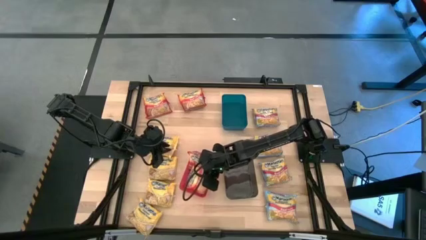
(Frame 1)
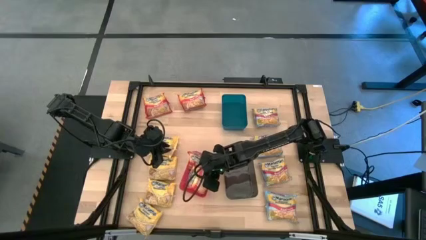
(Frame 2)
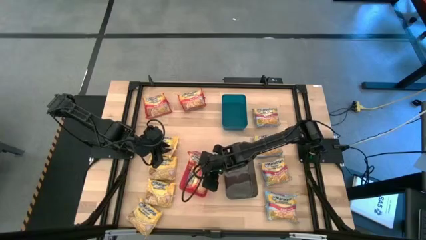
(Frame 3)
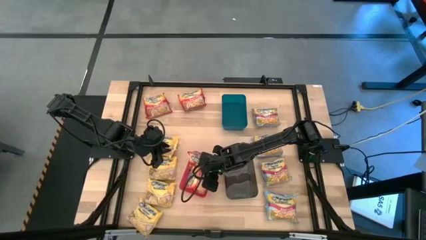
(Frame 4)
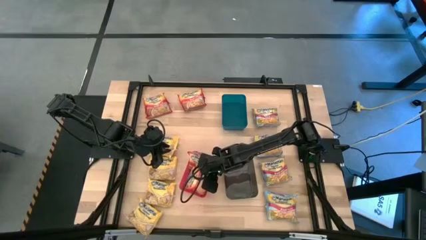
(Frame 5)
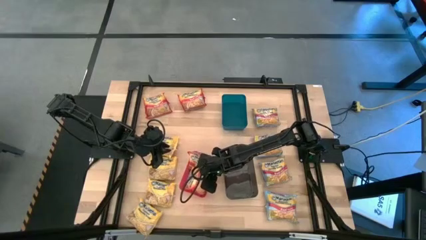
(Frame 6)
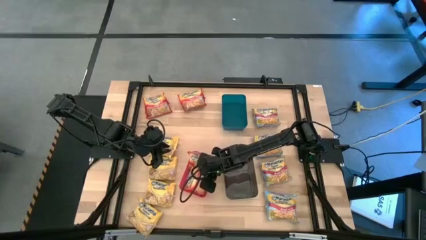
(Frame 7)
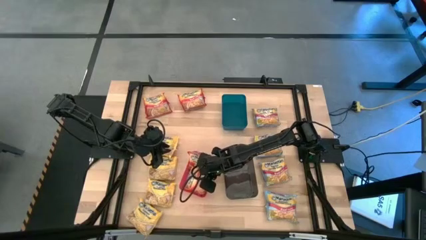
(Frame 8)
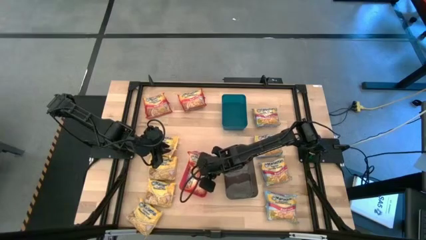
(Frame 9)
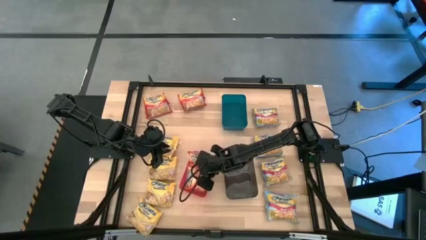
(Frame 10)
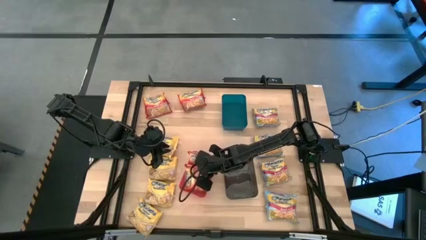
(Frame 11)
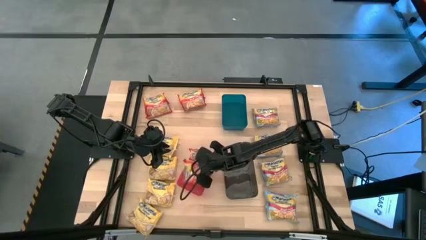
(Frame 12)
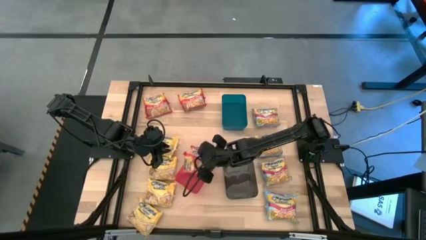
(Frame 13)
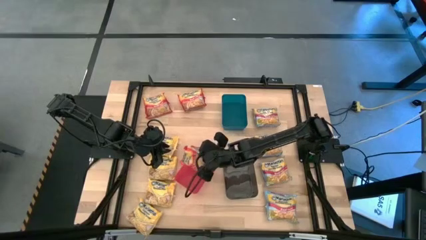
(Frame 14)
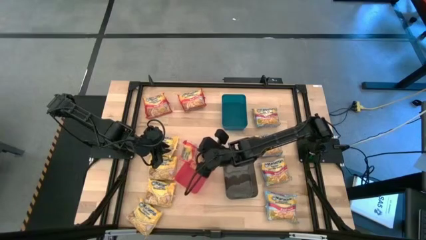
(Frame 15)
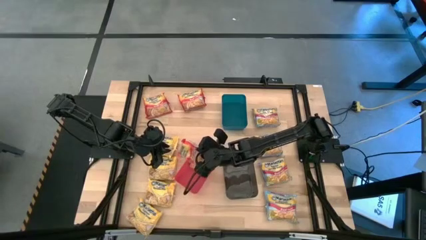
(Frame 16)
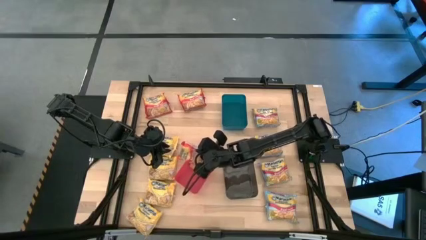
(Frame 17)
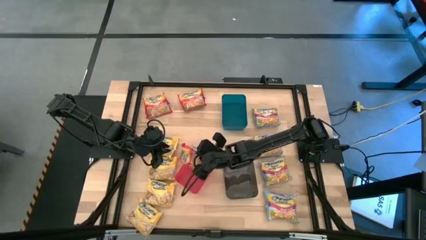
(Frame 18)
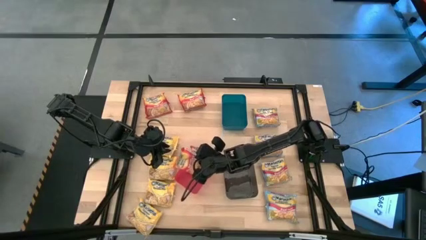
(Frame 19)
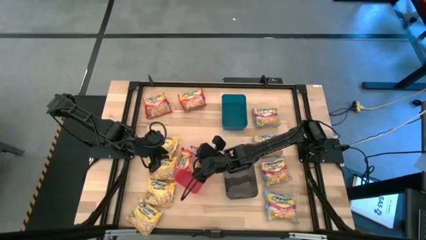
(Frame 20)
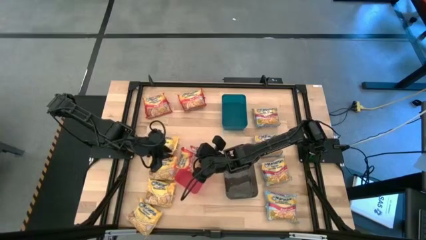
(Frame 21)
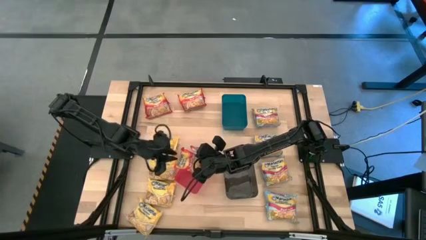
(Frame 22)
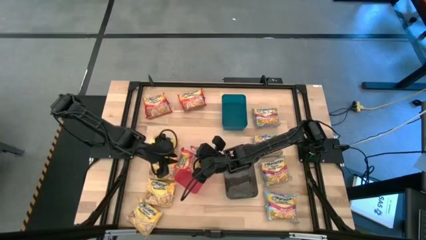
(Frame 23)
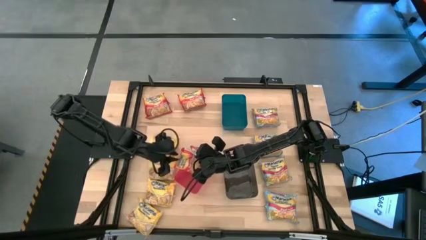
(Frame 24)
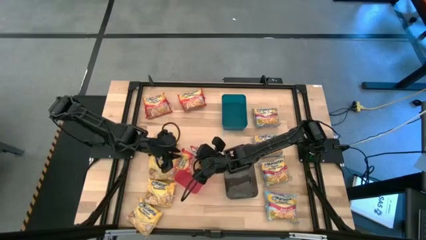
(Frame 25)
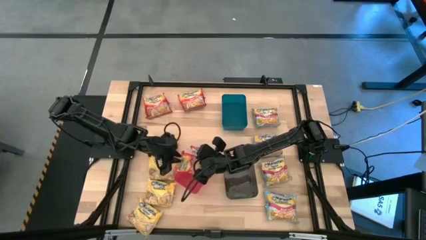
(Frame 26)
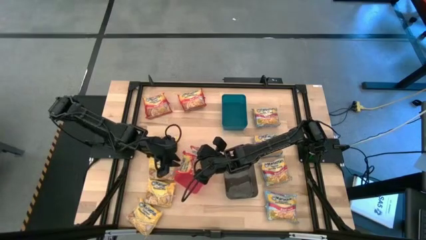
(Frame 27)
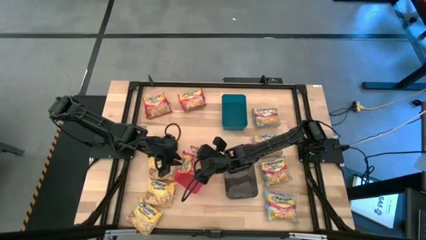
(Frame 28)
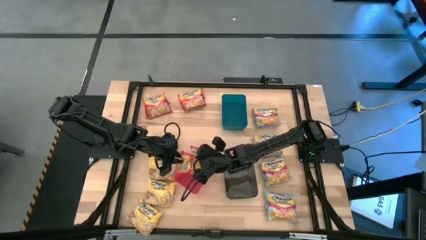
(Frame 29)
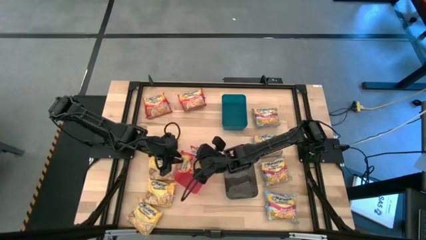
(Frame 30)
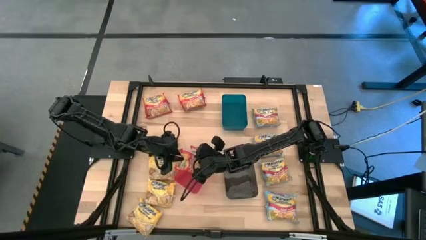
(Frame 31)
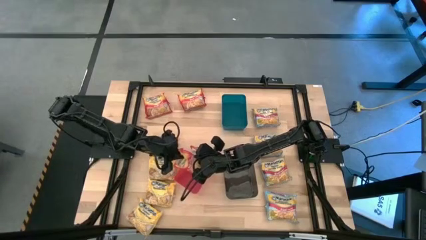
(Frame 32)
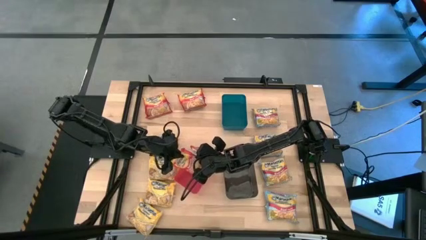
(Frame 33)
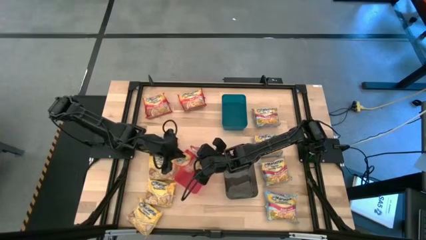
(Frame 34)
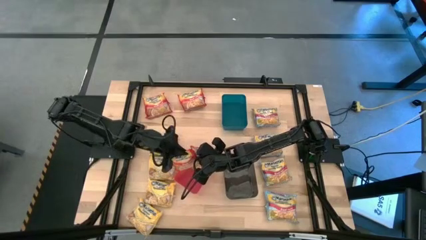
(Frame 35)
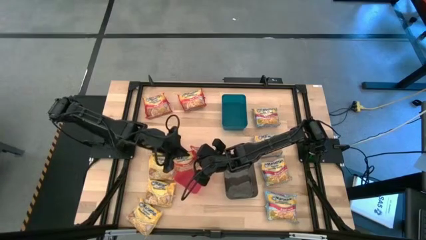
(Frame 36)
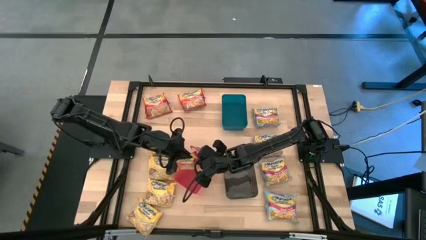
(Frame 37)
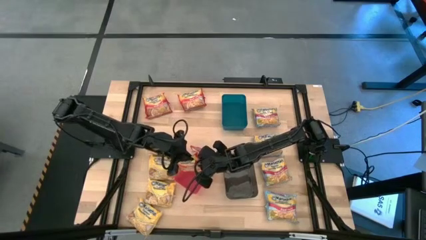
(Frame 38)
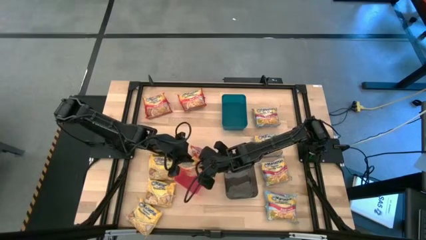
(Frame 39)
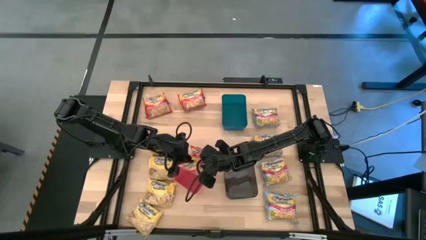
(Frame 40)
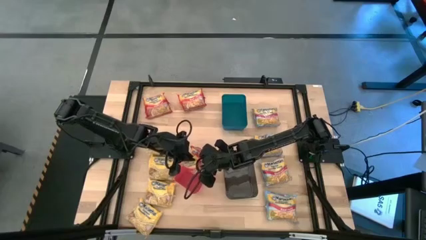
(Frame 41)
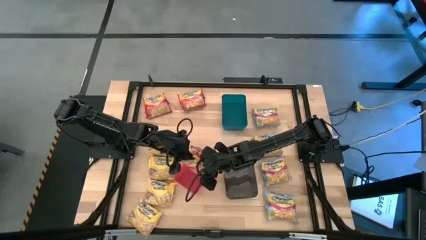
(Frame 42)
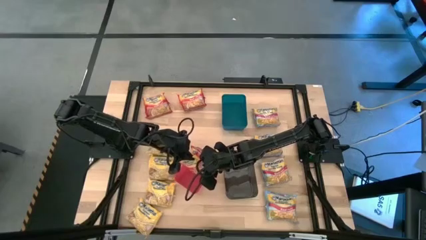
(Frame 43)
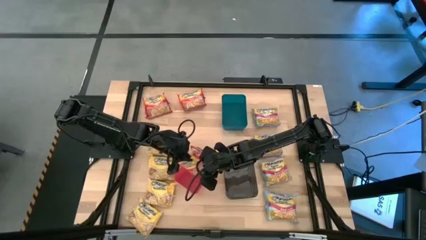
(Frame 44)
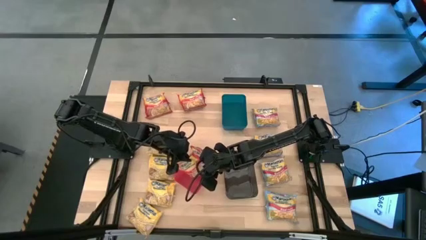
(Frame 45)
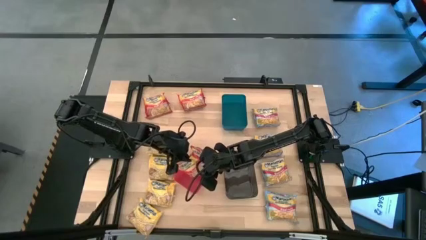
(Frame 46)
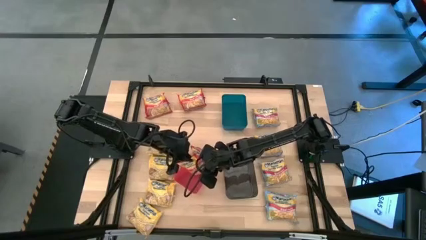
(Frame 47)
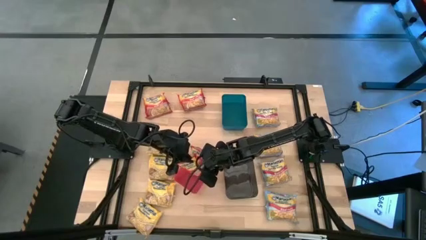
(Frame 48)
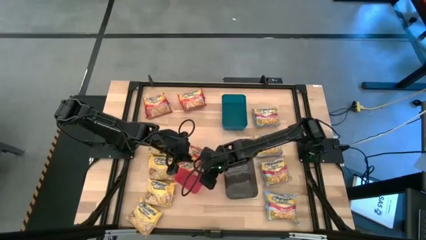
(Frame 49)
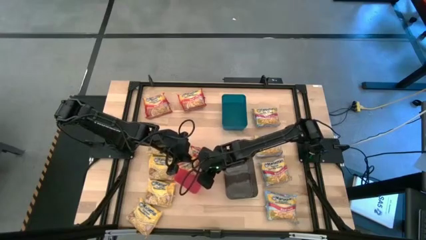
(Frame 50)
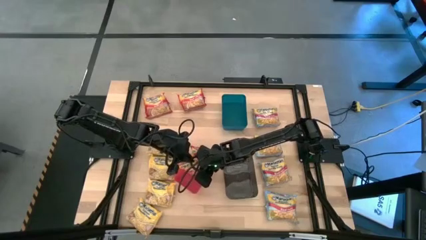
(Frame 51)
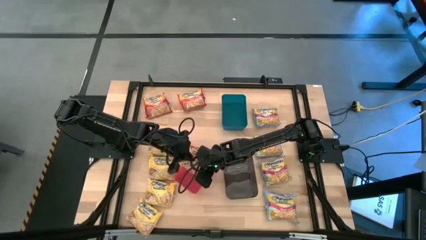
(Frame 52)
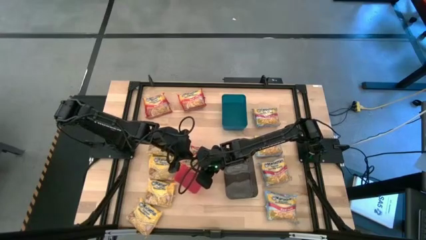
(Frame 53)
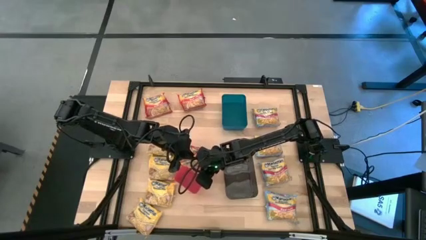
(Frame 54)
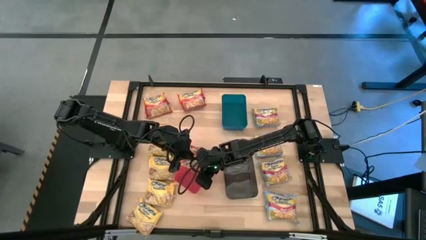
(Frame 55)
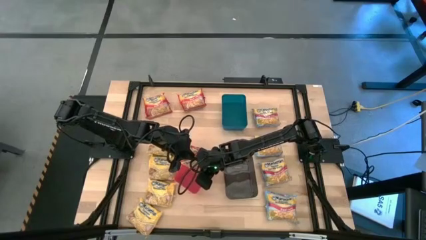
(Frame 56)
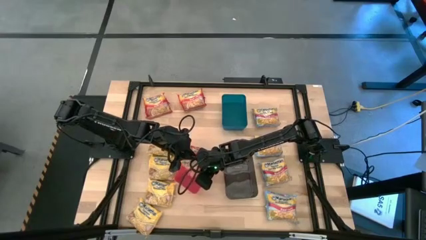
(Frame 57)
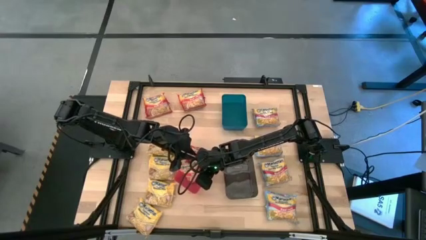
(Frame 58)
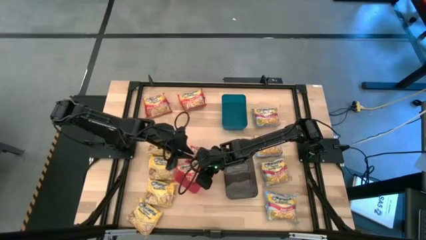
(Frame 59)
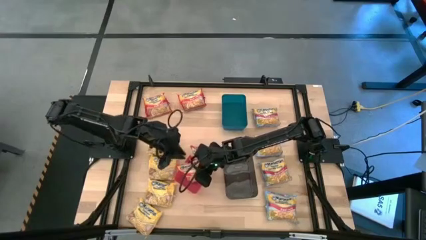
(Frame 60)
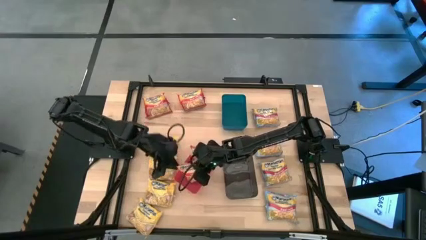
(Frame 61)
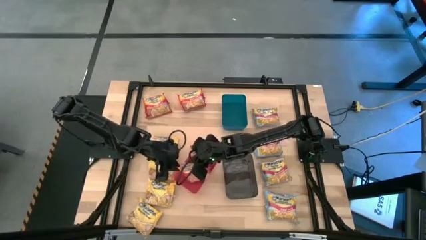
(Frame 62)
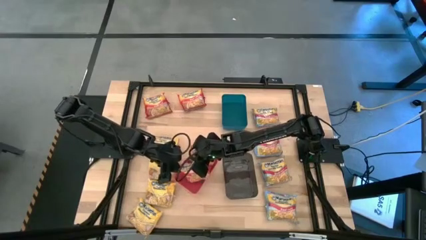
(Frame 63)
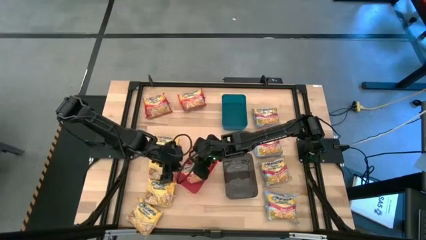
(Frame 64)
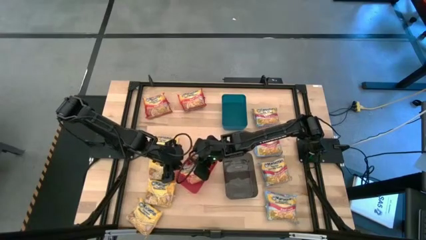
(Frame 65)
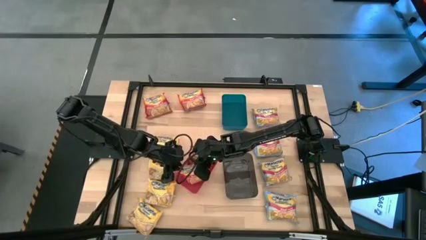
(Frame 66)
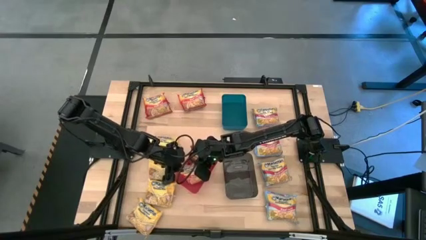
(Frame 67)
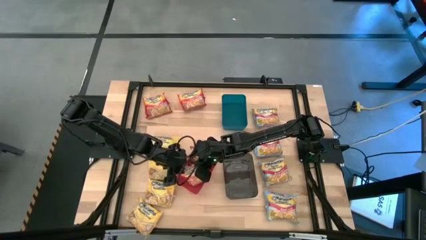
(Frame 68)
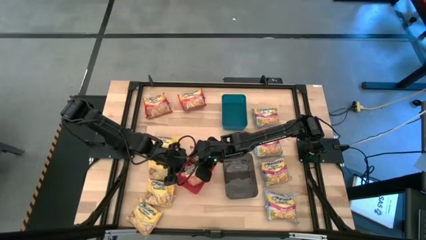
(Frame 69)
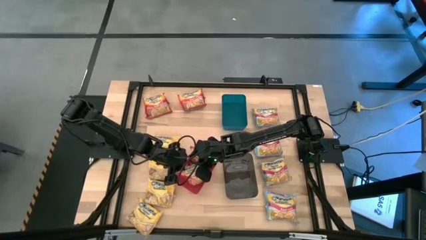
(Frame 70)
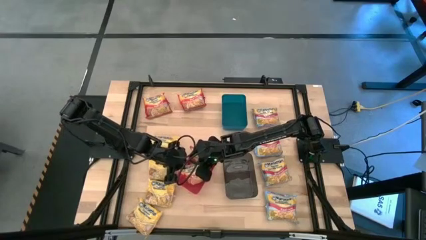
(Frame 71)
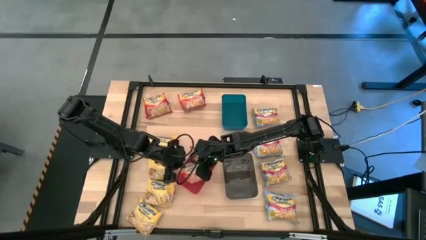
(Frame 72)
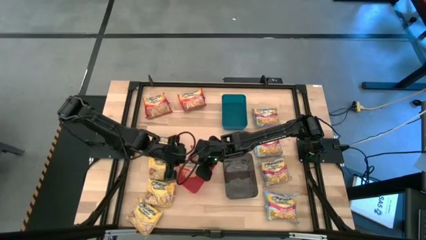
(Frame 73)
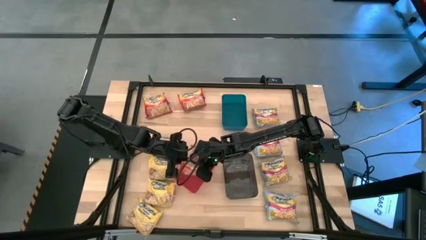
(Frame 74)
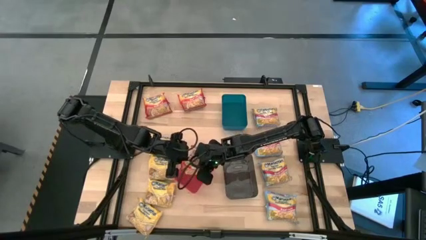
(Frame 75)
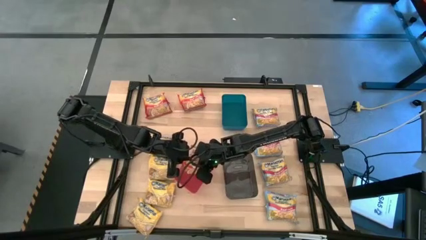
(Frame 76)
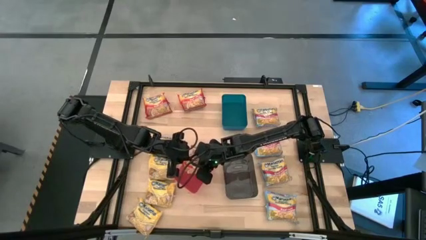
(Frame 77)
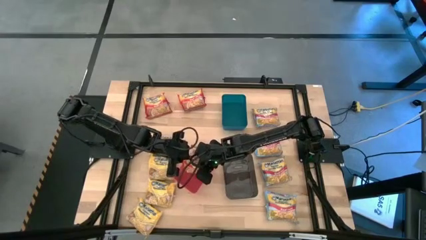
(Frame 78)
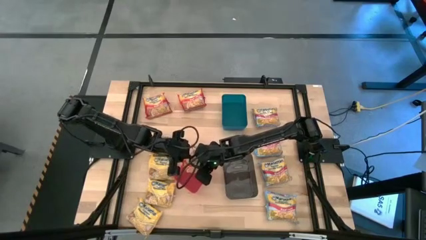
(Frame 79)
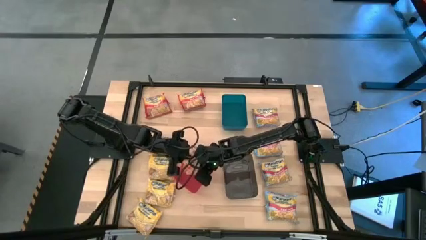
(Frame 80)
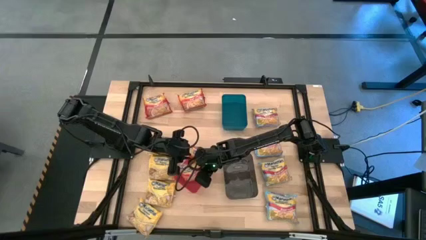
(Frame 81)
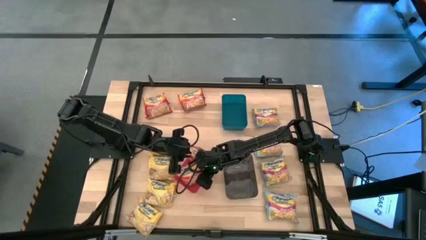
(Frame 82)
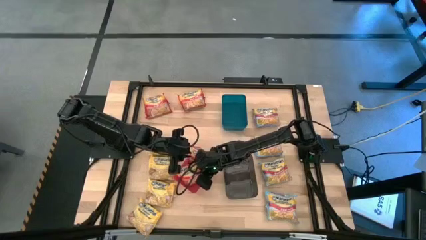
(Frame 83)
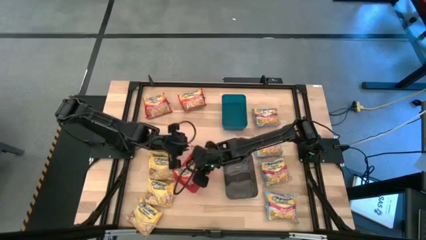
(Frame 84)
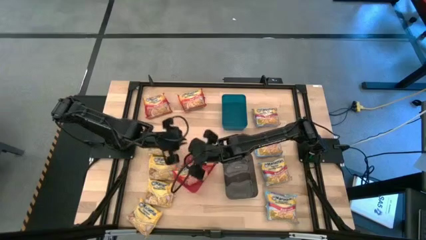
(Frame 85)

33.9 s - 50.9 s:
Task: Sort Maruchan noodles
Put the red bag into the red bin
